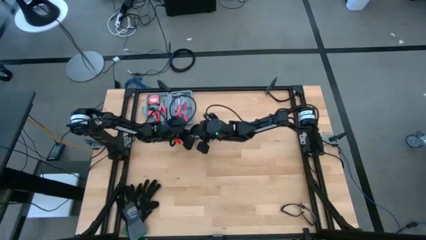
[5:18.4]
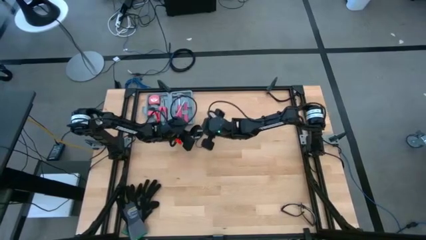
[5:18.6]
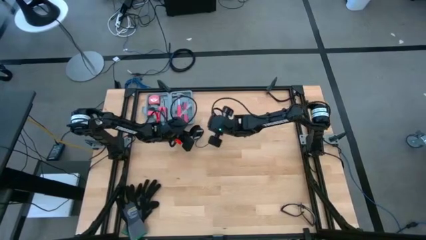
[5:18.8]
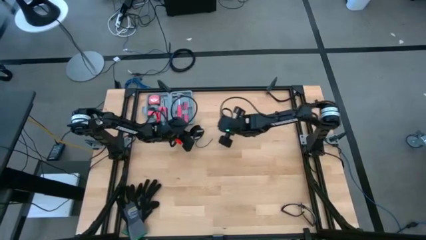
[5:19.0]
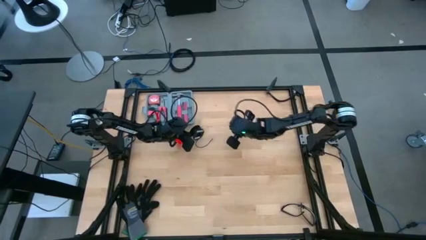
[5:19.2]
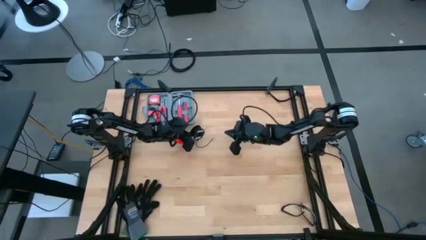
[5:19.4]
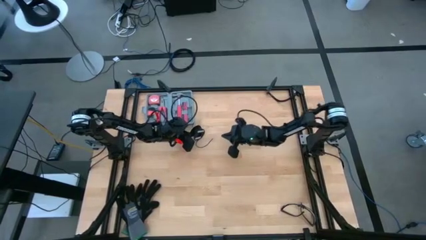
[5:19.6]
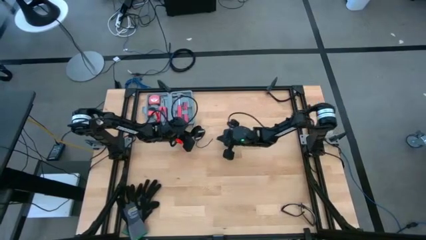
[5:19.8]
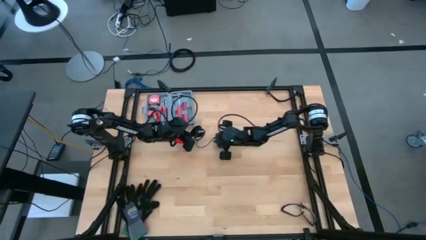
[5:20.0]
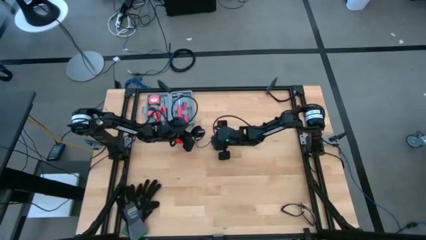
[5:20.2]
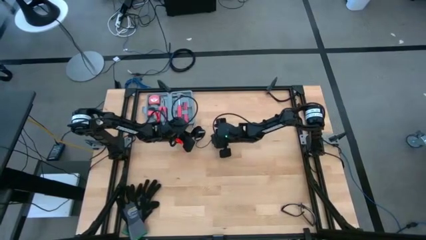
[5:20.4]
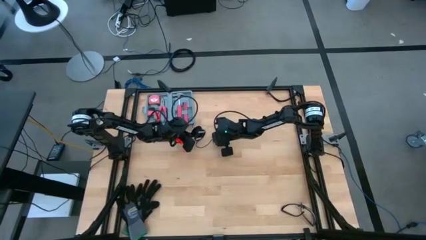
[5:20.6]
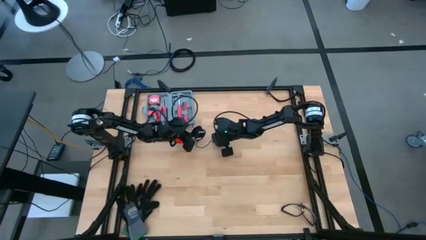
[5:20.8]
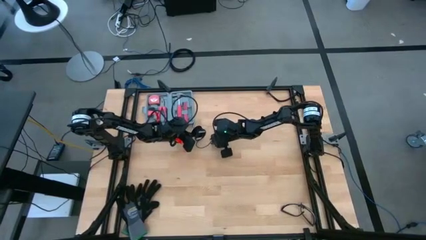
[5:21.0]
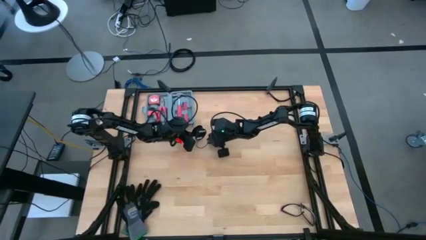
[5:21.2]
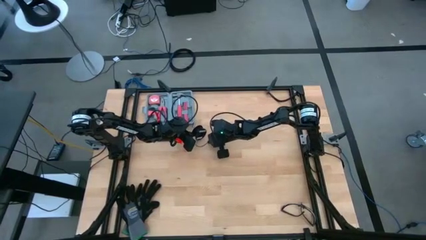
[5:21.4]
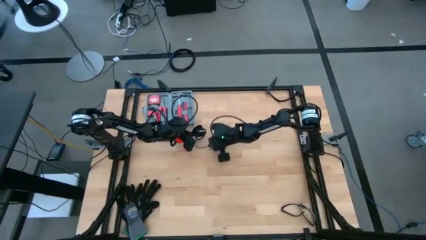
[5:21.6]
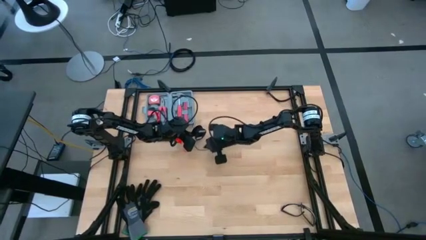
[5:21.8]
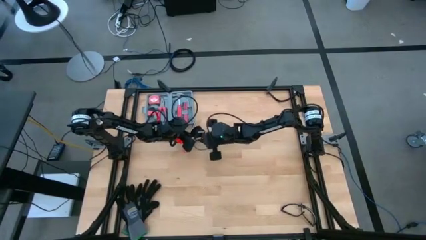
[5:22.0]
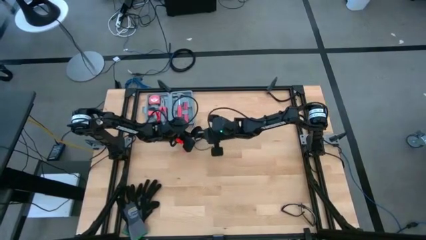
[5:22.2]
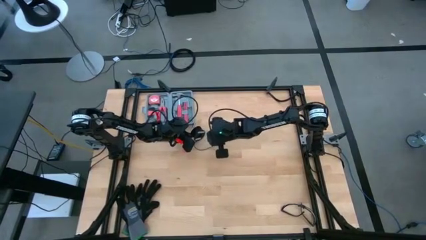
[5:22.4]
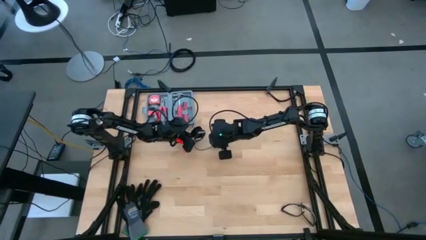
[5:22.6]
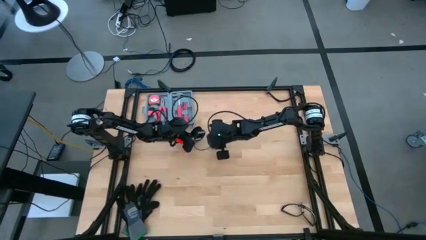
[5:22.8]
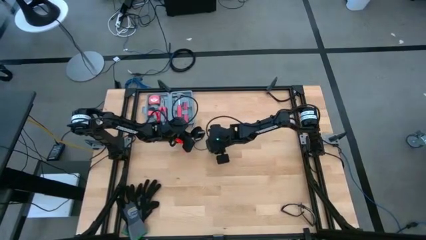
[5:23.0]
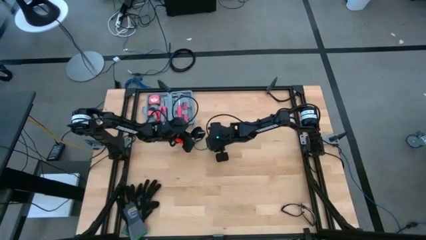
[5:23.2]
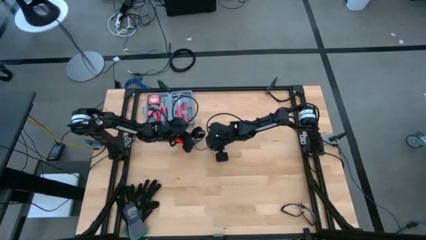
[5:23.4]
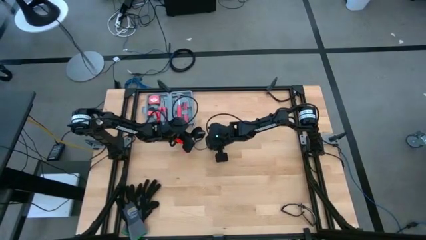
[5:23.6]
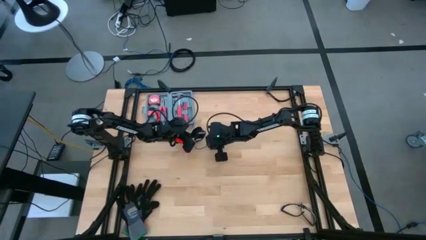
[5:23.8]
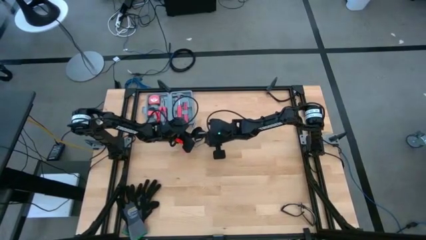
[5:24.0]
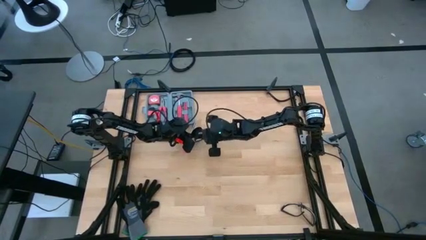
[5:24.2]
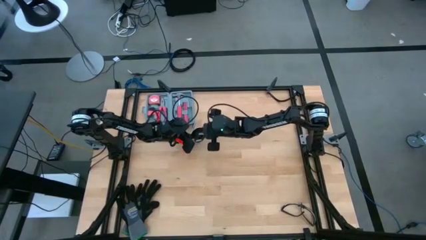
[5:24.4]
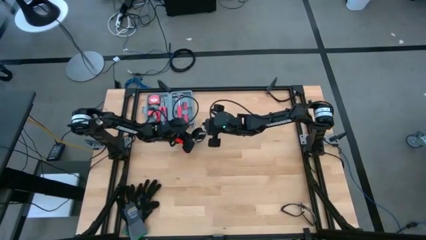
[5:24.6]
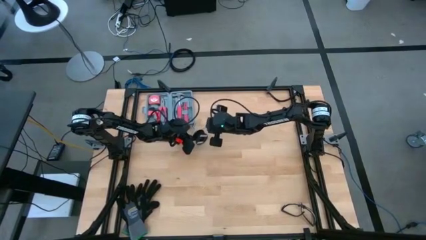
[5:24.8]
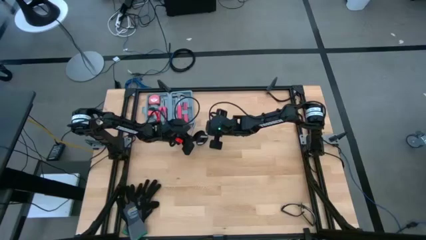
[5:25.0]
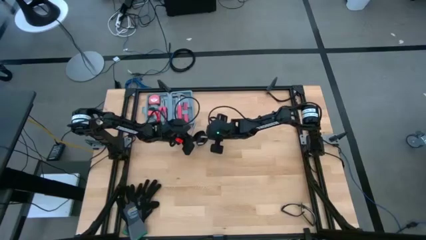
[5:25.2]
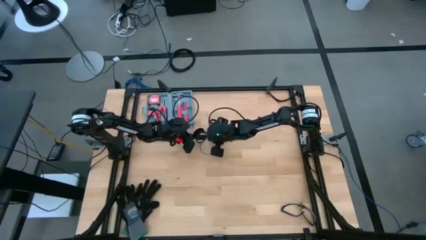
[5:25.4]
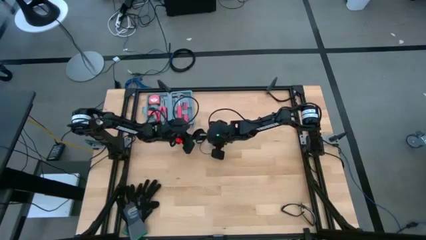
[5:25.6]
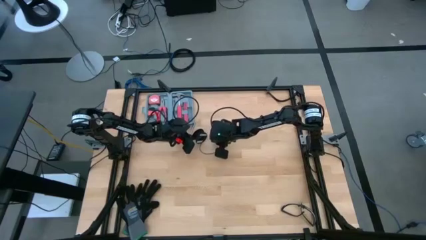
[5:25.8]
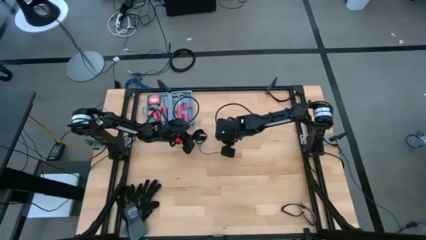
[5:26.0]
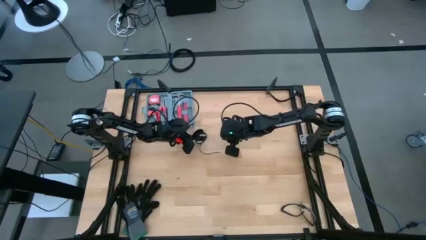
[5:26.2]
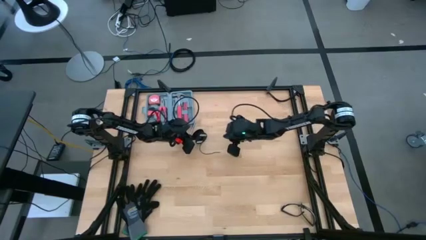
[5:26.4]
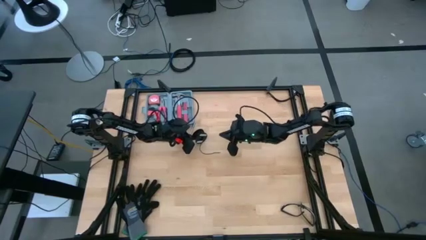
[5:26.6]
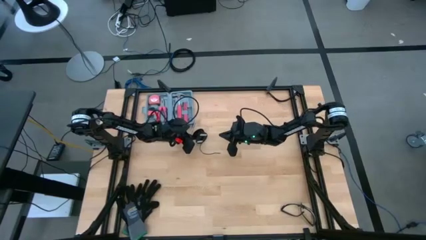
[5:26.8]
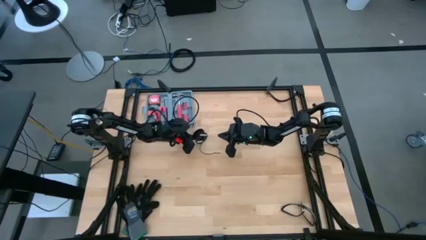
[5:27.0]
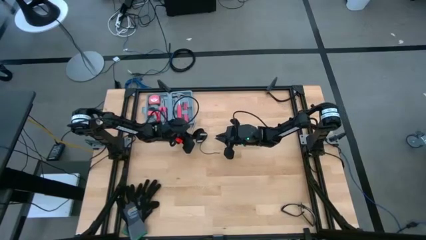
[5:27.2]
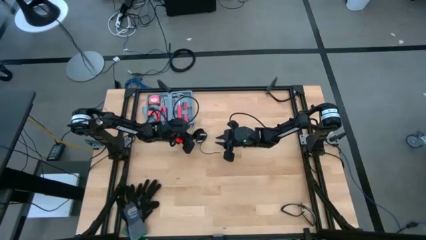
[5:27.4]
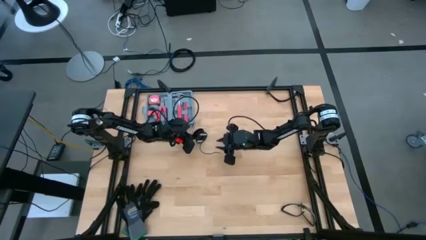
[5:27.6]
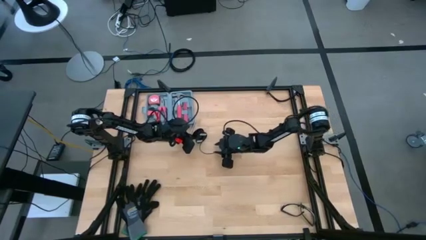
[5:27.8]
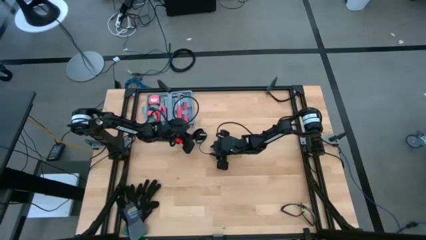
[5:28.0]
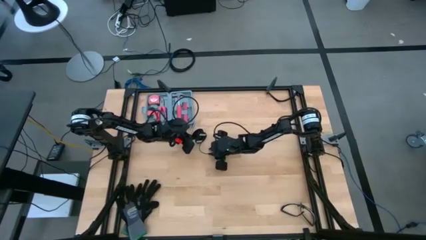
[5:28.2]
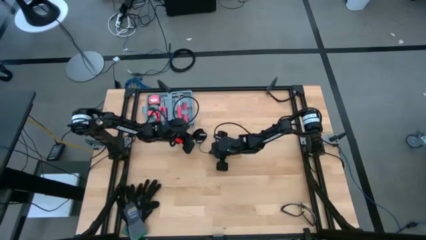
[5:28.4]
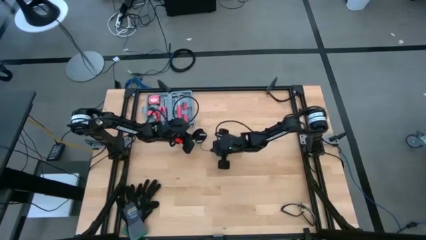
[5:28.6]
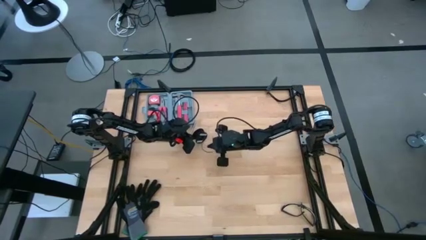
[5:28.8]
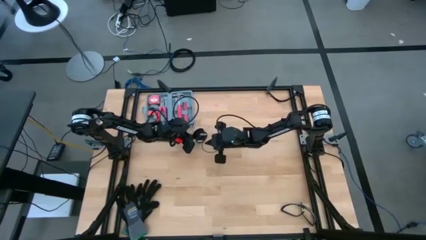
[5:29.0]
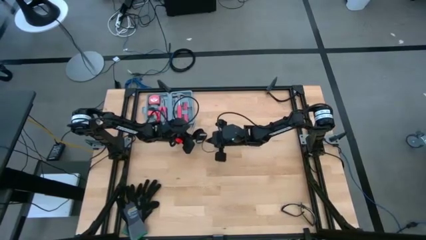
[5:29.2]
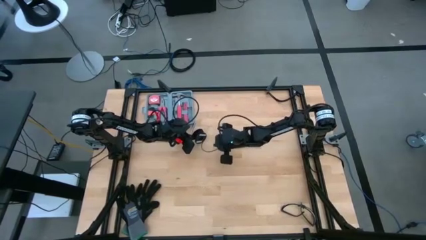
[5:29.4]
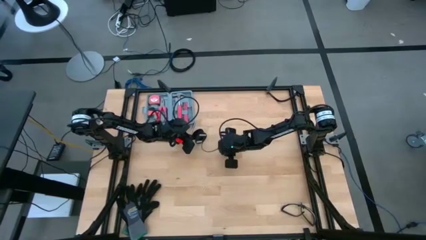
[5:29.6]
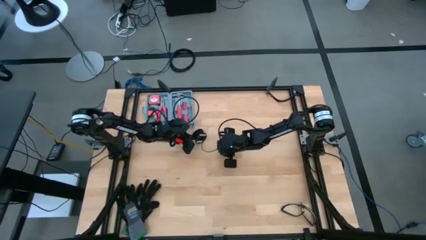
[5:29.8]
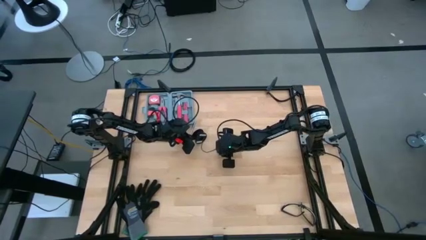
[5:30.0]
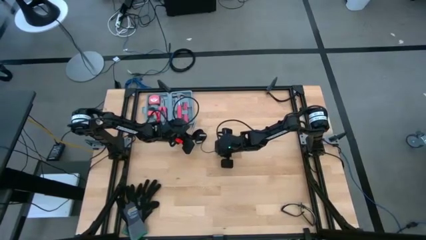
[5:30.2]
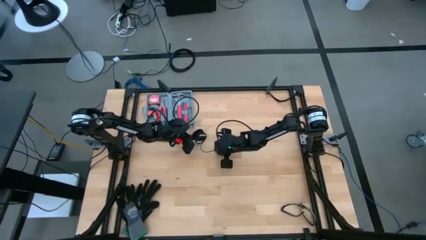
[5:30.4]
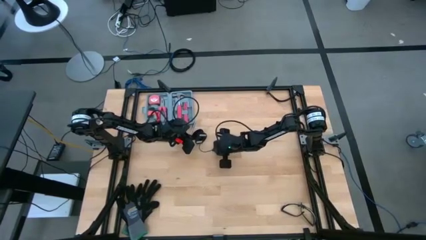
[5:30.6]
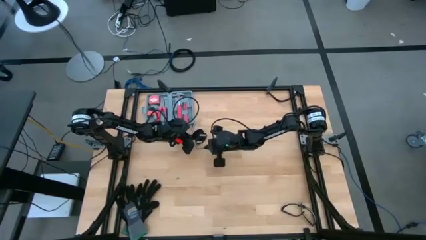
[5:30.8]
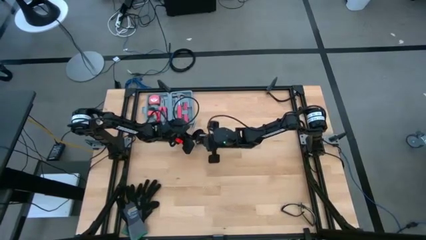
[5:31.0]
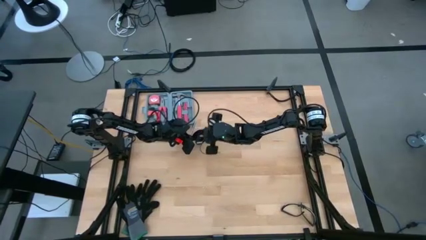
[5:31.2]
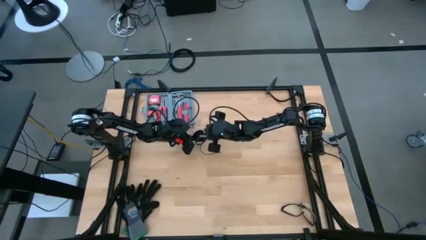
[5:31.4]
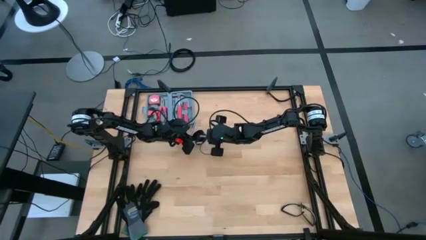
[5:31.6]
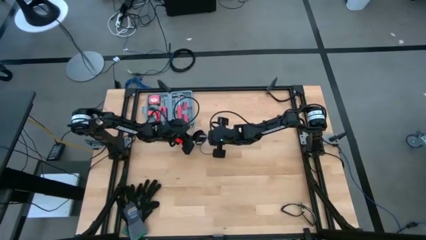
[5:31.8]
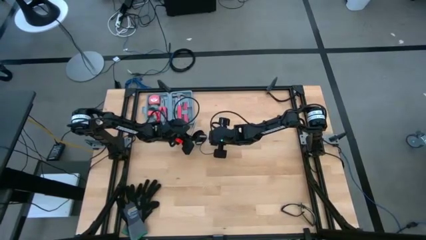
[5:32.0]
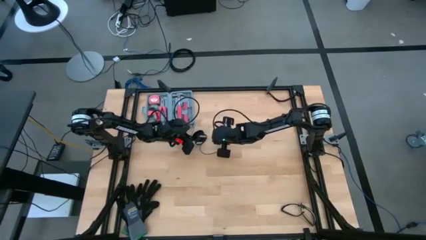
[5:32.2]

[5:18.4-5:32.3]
Task: Coil cords
Coil the black wire onto the spool

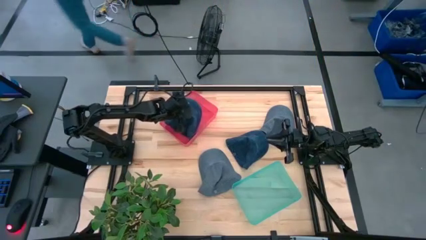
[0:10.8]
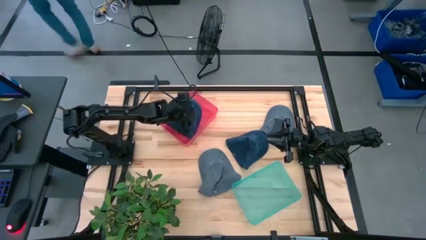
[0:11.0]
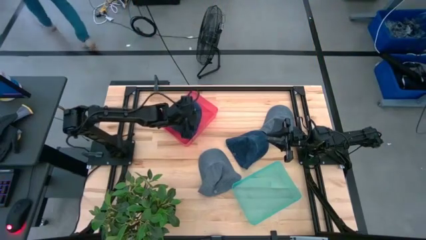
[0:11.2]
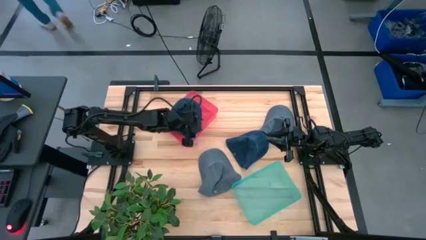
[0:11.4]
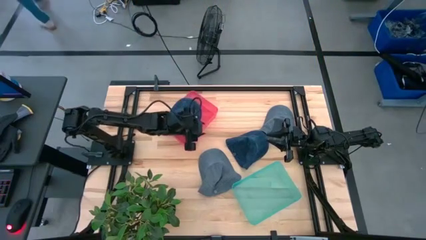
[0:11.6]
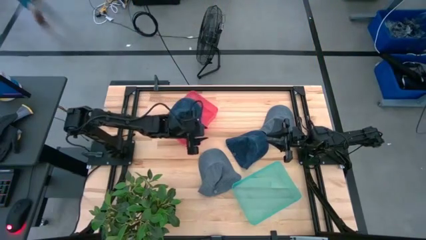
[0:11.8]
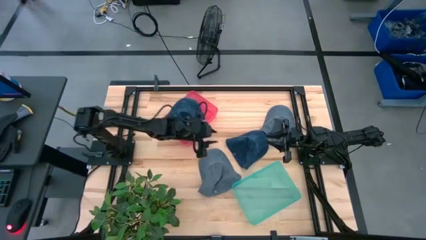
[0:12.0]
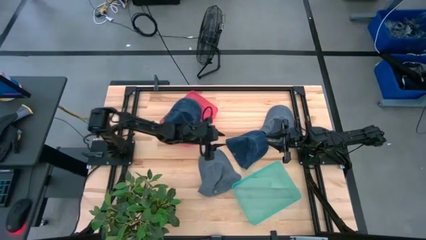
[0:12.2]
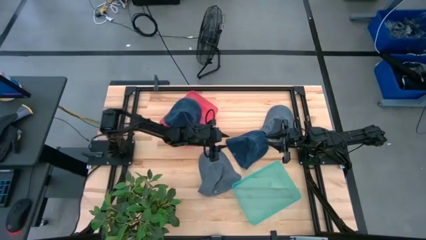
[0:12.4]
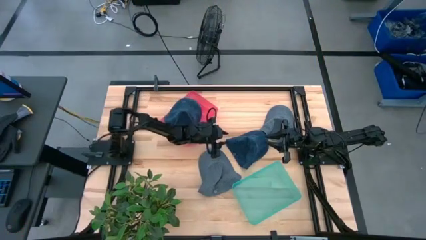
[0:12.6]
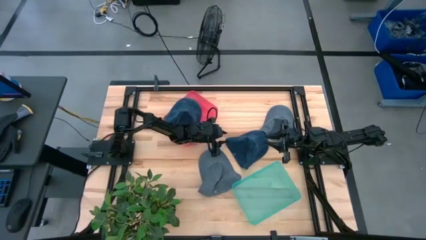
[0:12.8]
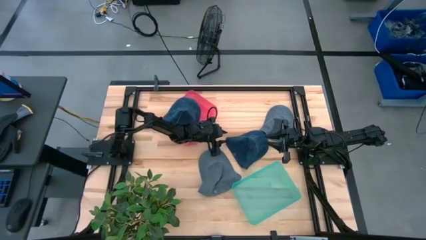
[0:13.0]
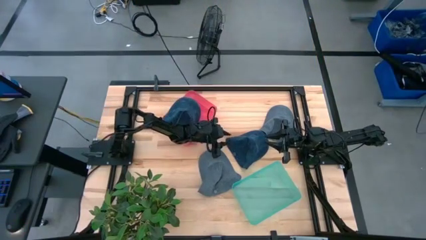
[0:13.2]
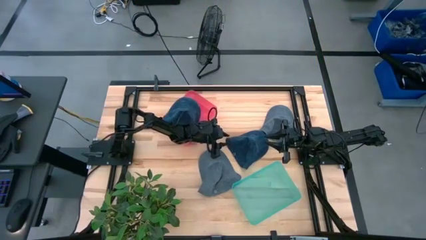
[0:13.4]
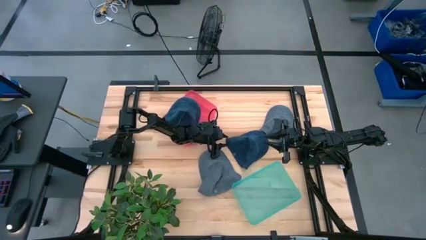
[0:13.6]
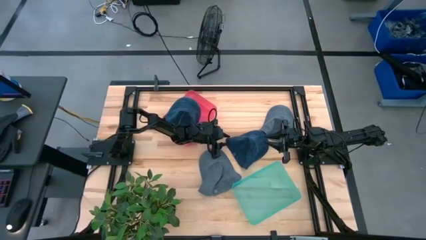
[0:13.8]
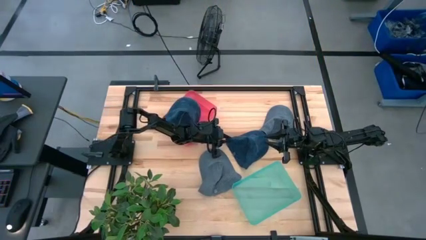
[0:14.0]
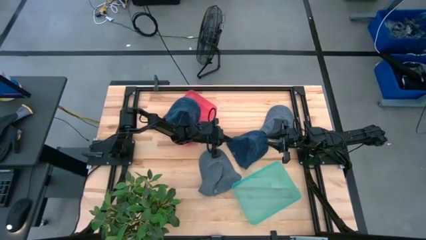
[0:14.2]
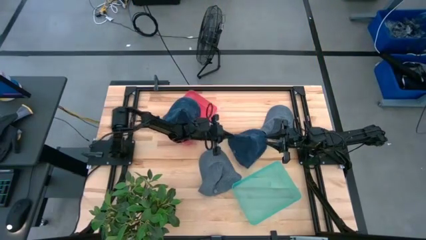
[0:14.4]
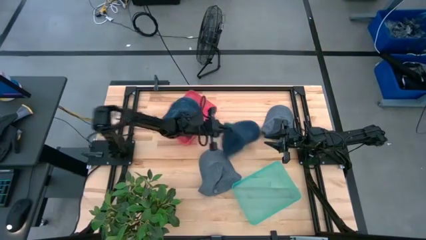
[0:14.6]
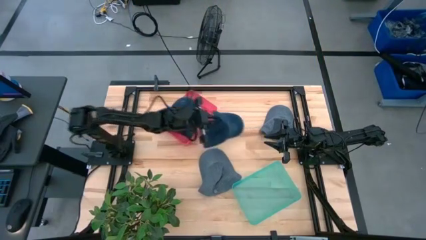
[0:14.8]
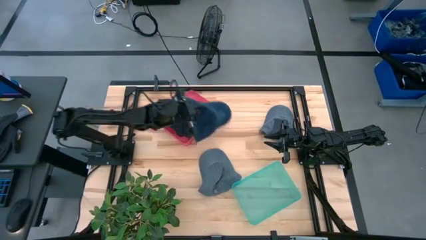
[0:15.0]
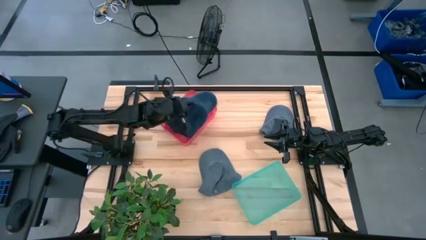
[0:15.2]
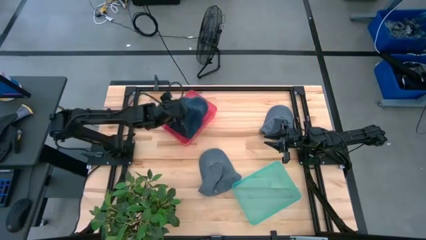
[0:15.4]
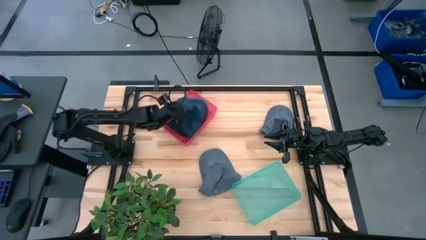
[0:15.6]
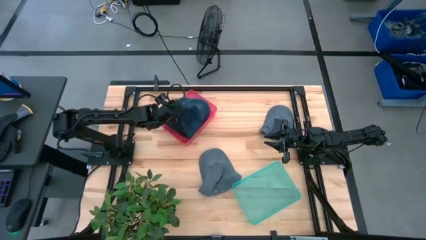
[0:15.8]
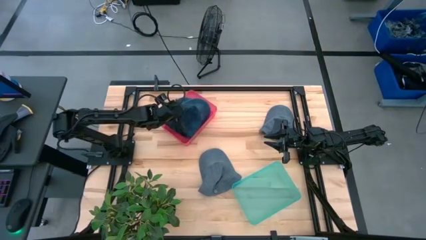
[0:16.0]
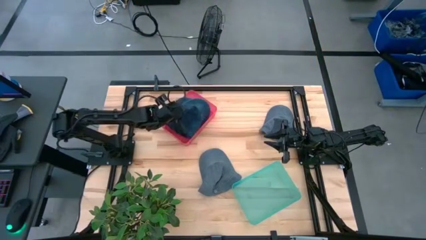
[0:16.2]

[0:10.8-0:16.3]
Task: Pick & Place hat
Put the blue cap into the red bin
